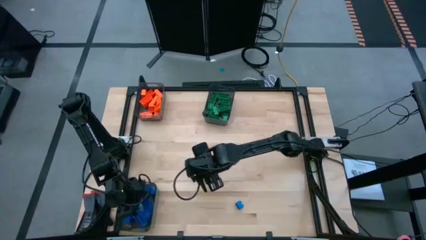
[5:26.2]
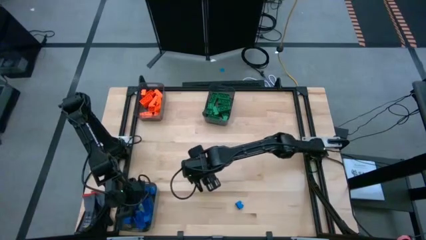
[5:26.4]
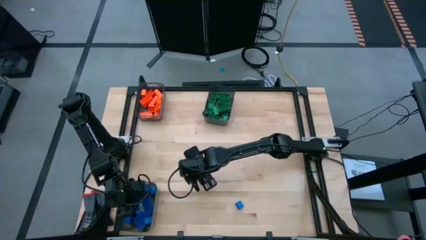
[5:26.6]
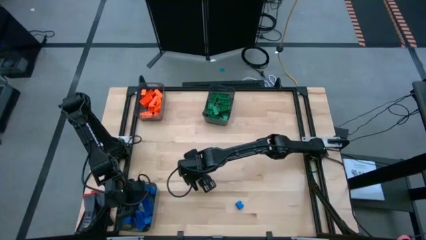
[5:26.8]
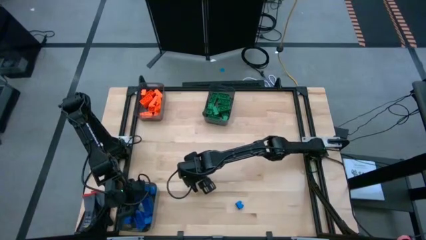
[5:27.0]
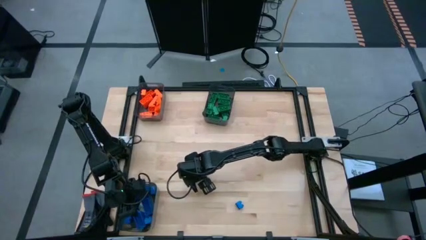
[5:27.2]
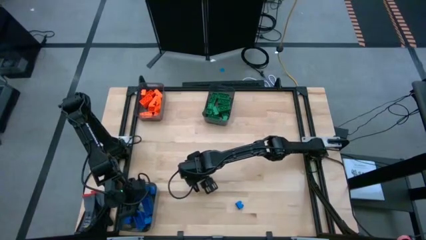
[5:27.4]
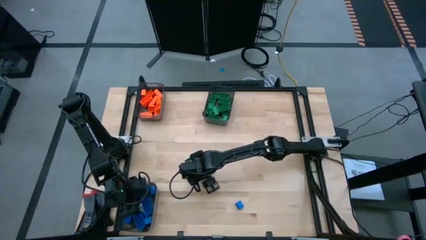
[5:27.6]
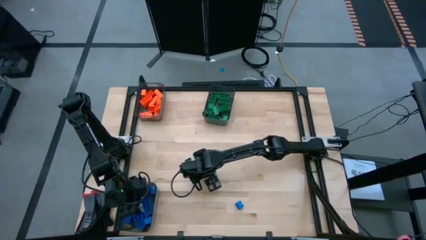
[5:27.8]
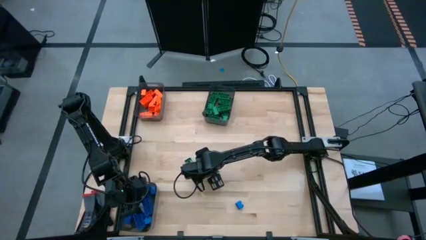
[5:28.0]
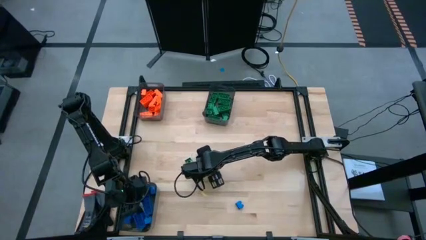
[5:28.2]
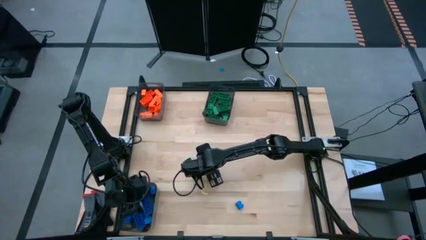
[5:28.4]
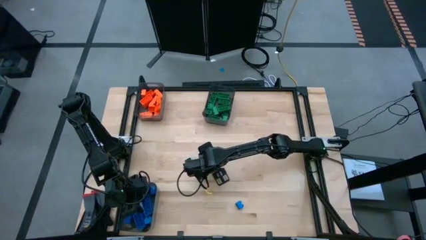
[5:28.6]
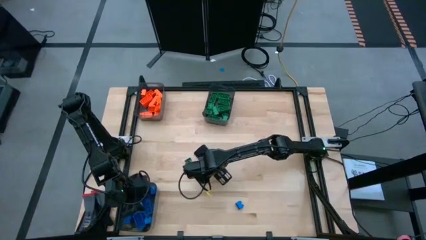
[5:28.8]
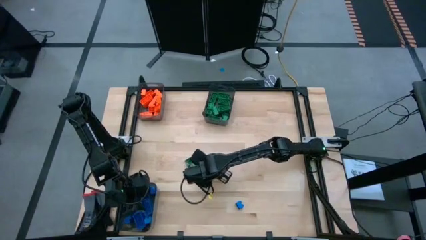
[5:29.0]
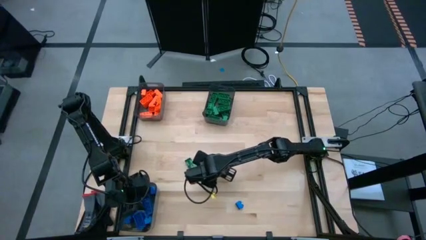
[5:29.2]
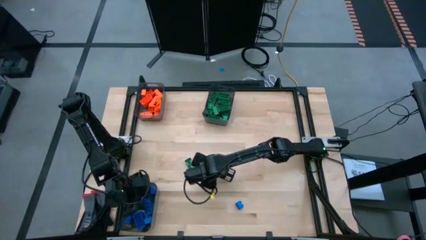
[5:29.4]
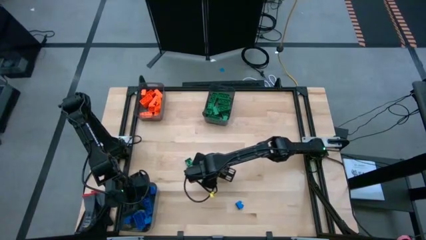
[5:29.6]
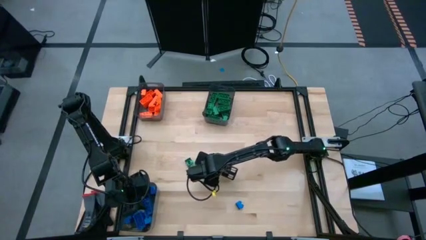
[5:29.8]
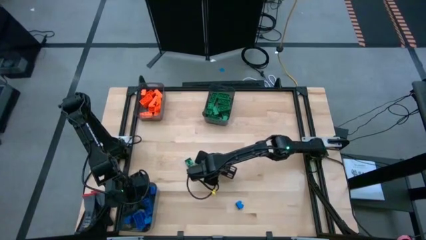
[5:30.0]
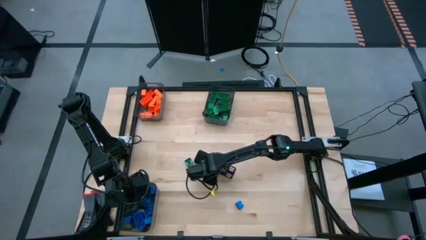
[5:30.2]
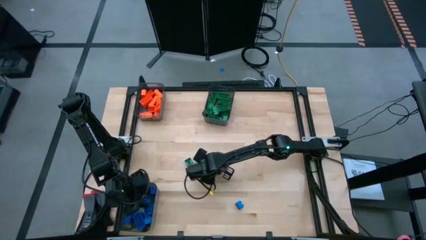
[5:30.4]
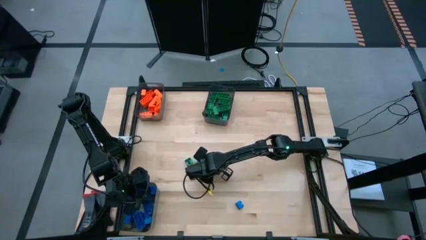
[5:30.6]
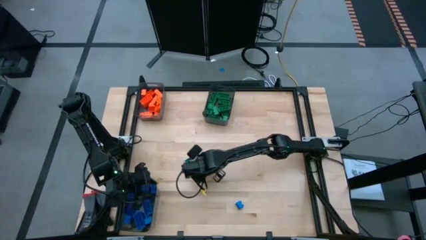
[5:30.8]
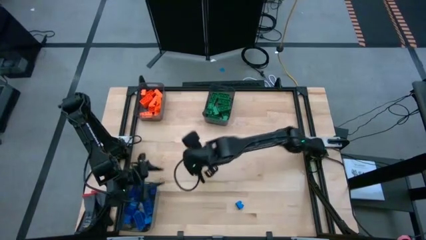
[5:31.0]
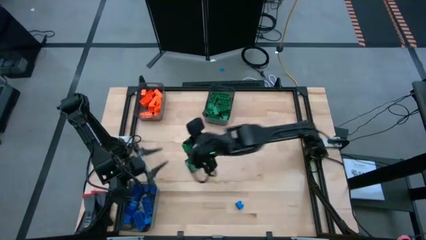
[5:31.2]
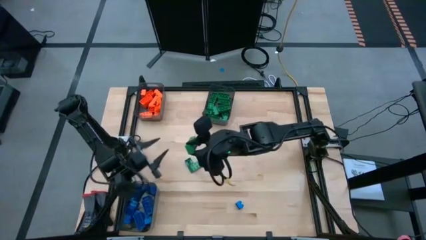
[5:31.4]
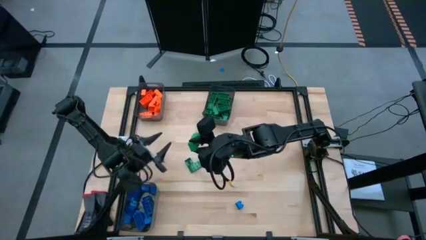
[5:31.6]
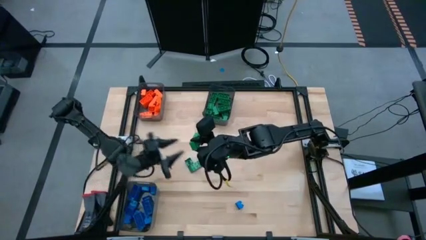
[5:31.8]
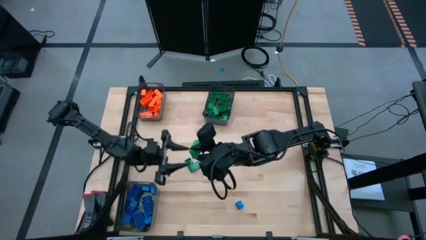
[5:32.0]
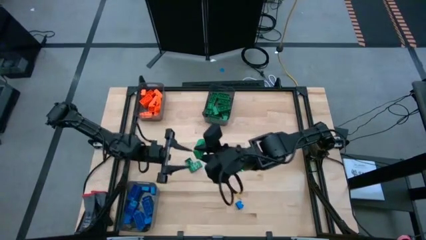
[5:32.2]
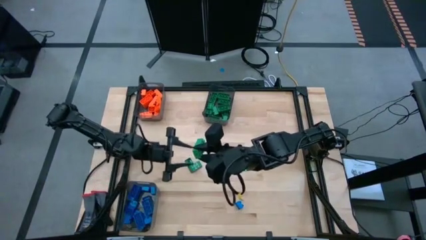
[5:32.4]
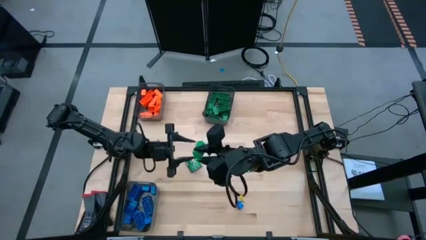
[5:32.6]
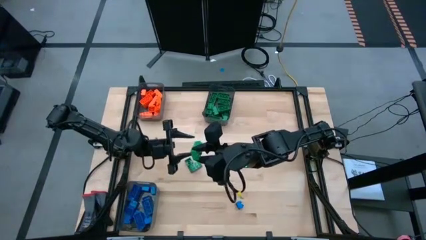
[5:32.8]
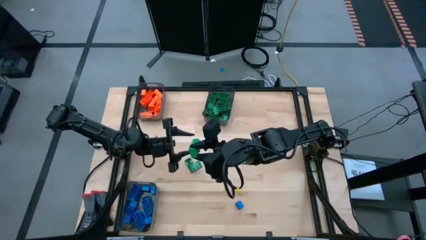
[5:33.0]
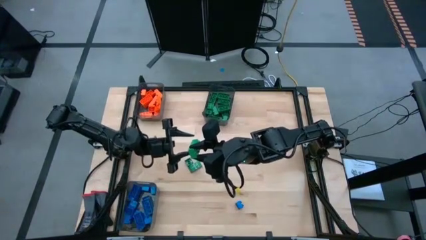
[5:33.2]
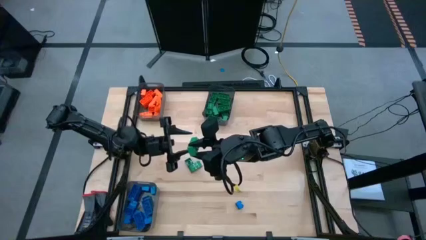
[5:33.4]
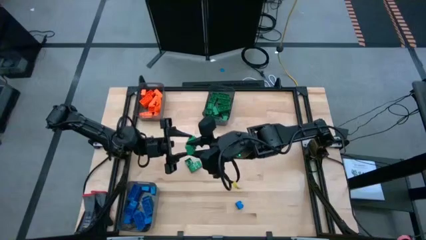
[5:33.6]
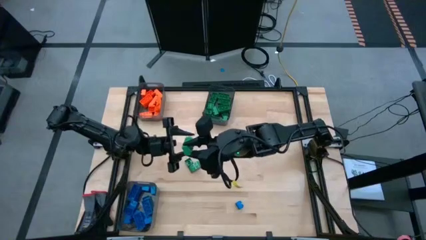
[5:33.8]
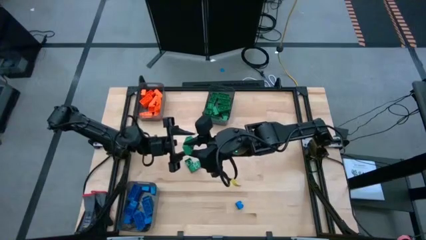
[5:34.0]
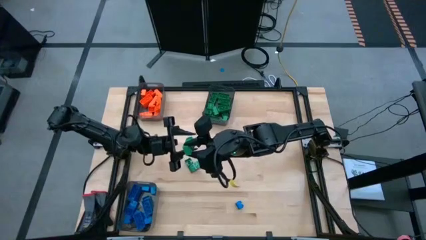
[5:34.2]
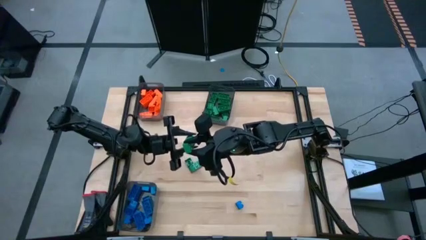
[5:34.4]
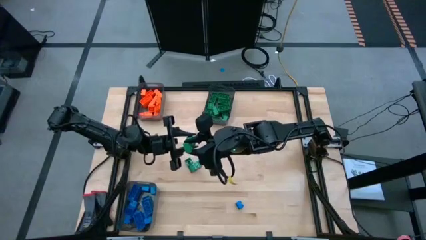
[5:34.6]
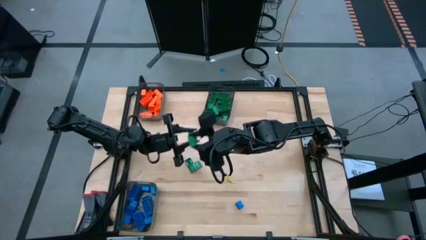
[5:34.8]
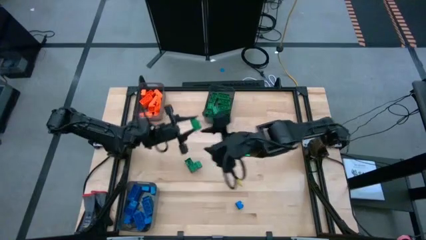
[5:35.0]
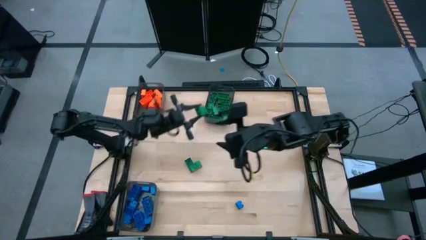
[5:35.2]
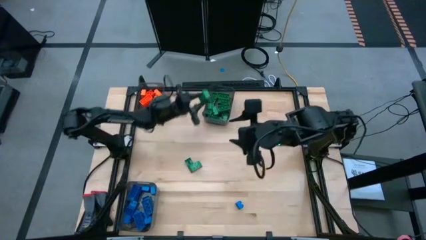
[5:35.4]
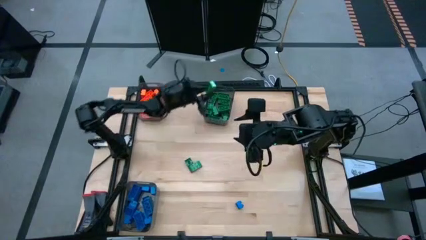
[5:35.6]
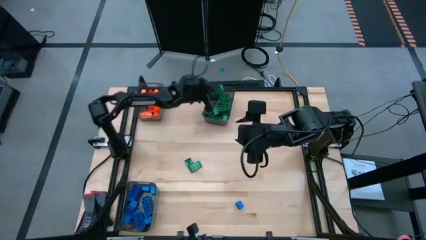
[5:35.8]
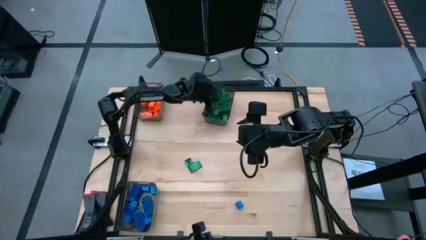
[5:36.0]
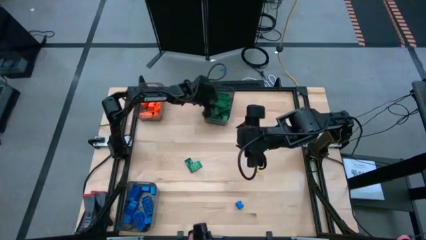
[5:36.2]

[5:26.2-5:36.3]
Task: Sort blocks
Put the green game piece into the top right black transparent bin

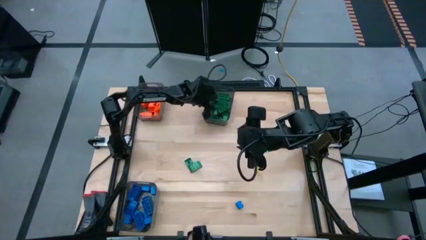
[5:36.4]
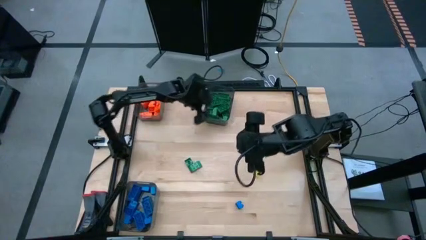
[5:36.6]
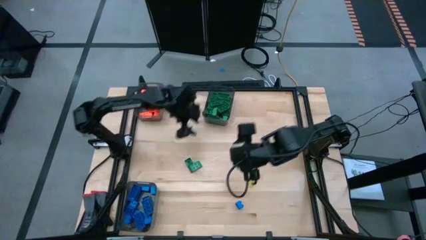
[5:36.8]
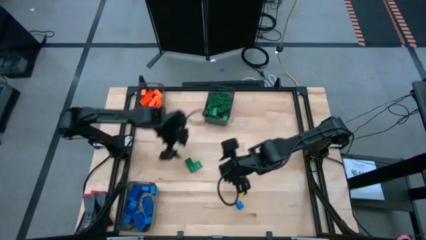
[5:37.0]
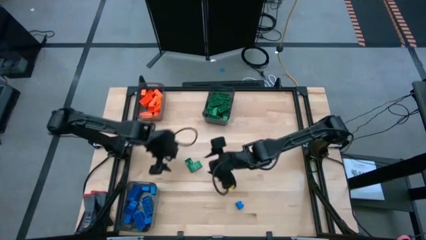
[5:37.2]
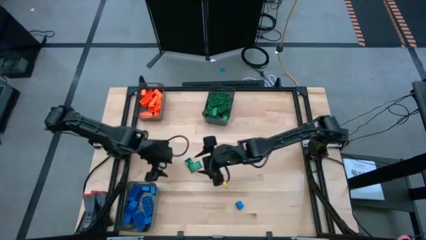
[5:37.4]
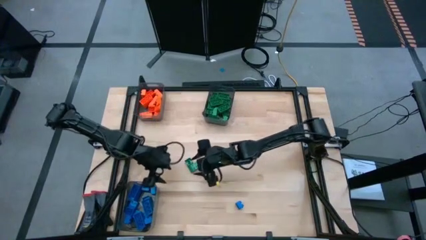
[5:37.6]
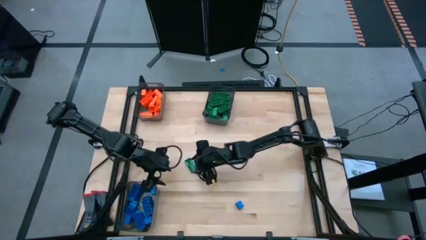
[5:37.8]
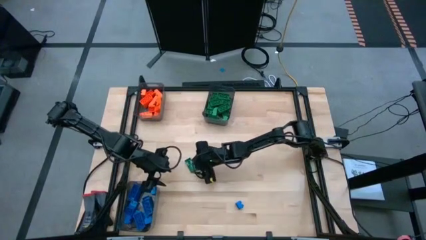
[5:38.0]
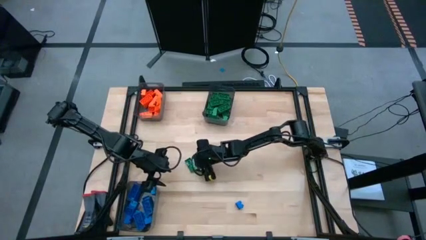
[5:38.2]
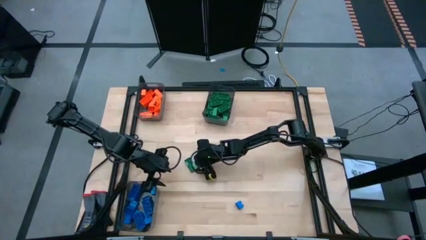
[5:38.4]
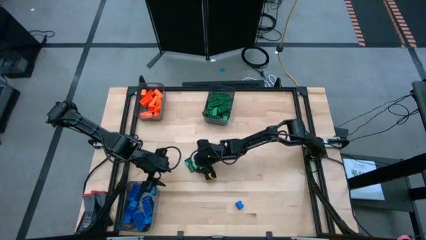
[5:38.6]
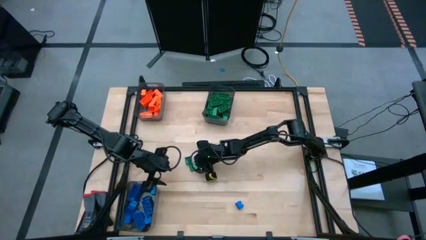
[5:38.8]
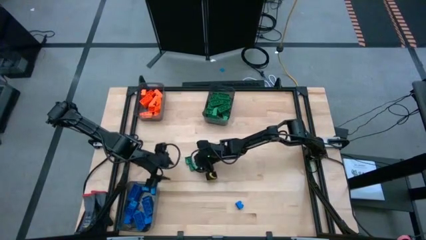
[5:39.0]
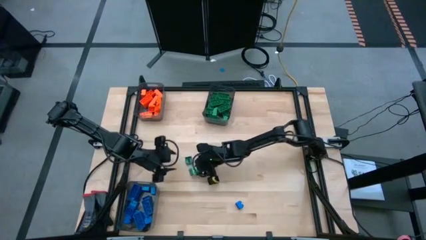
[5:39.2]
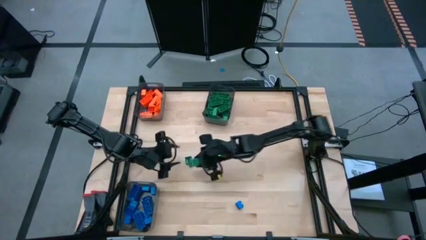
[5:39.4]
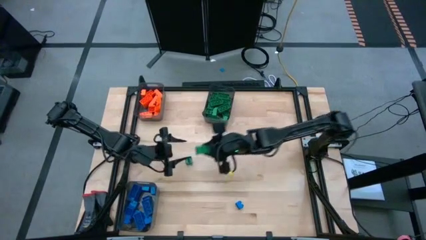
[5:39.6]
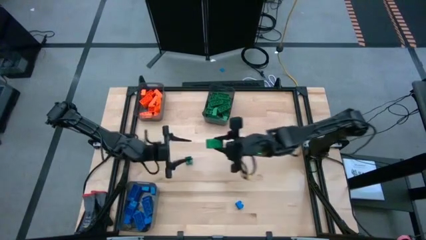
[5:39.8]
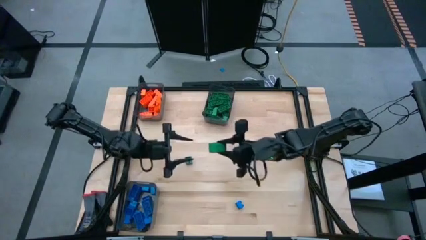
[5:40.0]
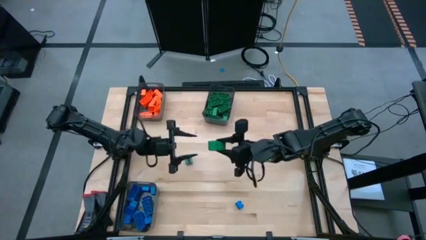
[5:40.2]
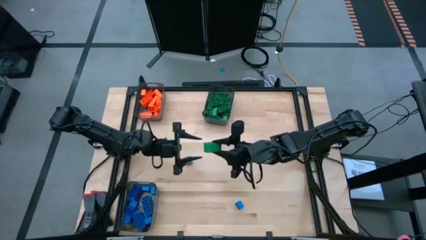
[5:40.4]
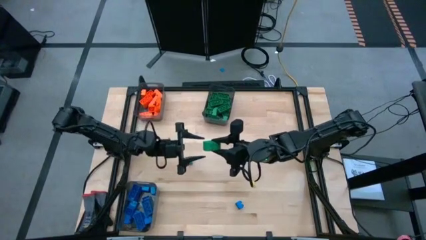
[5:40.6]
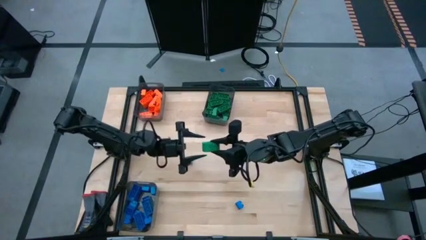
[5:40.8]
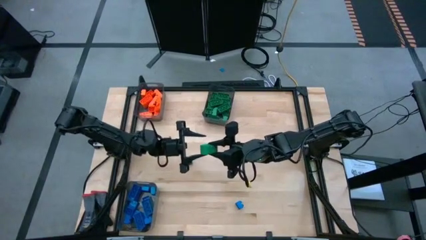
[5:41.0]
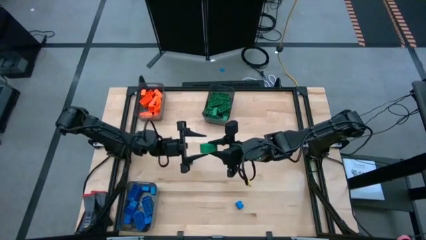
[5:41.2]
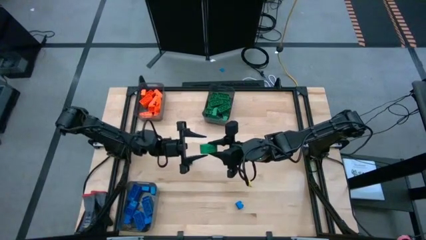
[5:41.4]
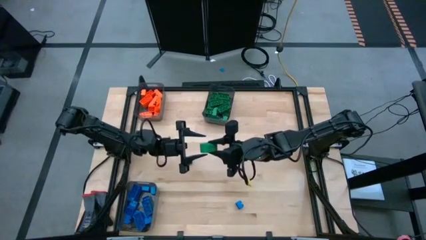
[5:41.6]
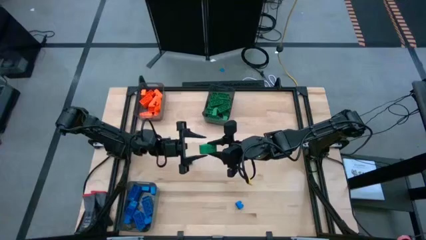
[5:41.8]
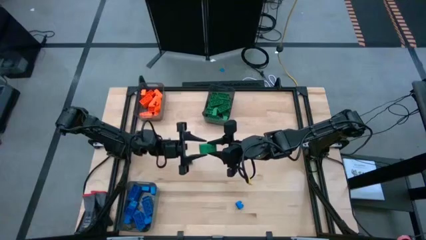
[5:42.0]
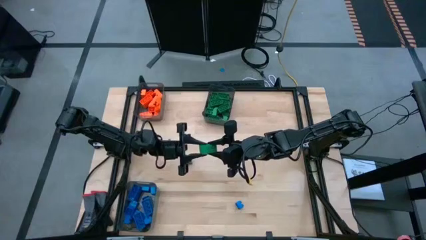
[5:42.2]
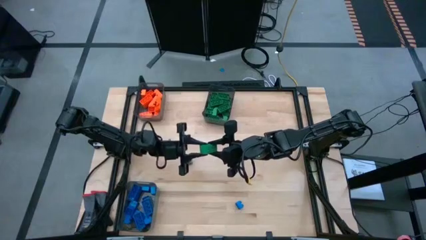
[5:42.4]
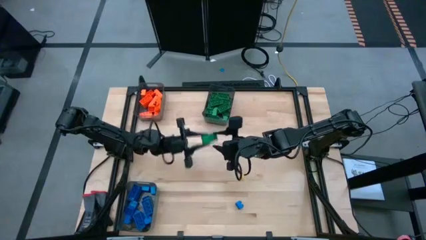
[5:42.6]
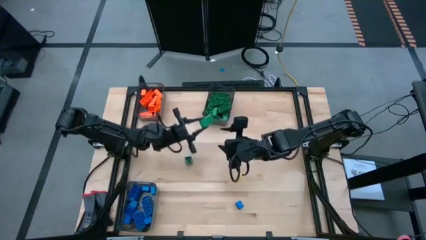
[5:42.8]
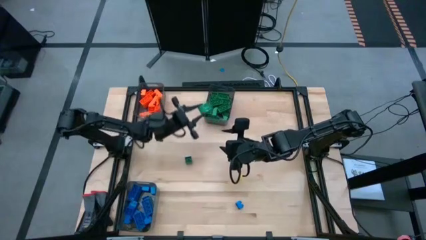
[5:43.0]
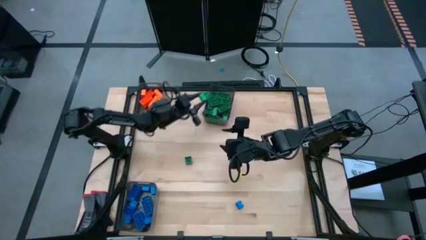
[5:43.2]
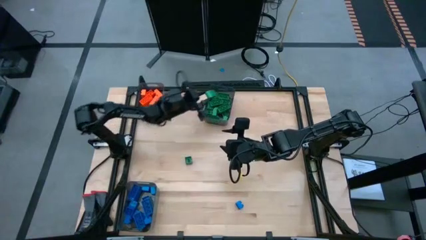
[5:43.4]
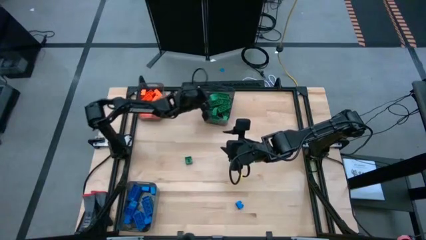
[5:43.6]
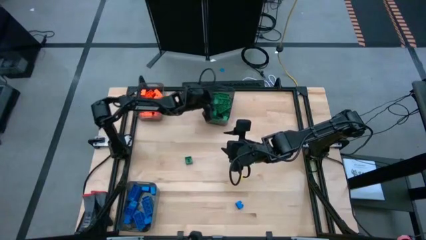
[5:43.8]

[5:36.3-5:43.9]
Put the green game piece into the top right black transparent bin
